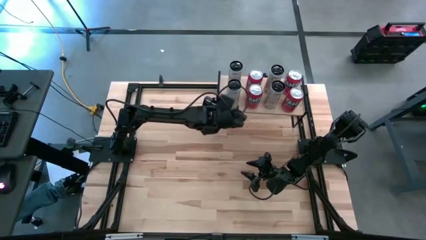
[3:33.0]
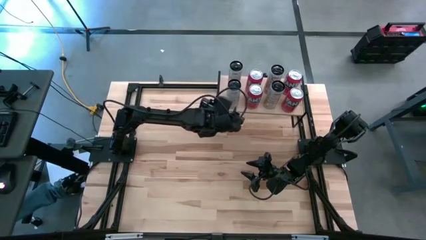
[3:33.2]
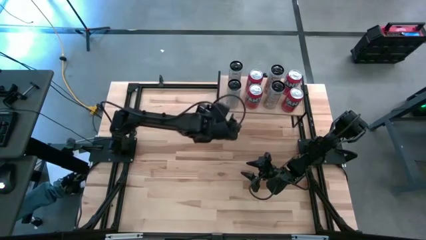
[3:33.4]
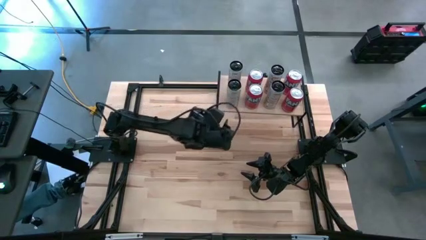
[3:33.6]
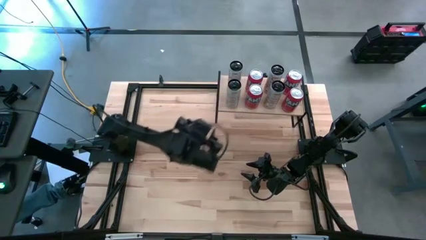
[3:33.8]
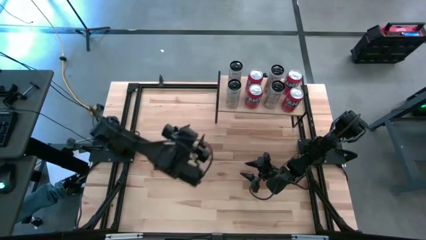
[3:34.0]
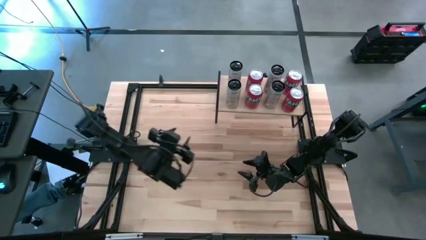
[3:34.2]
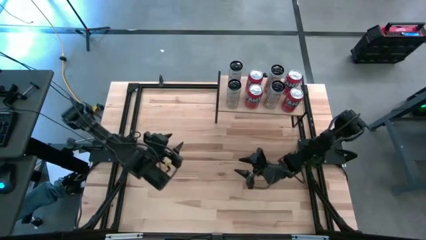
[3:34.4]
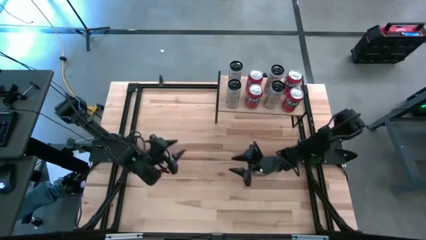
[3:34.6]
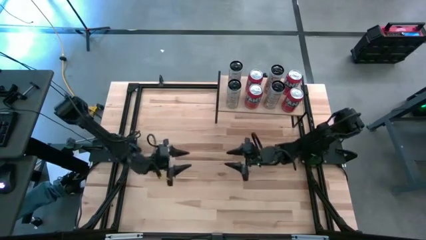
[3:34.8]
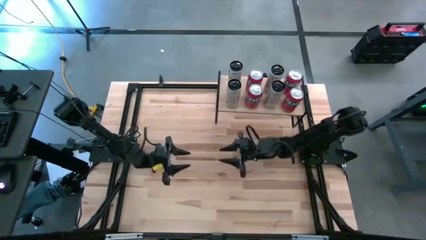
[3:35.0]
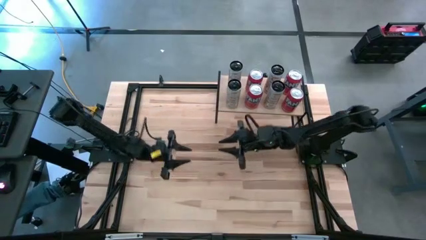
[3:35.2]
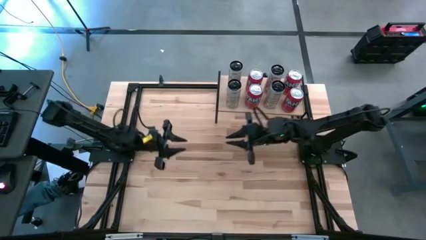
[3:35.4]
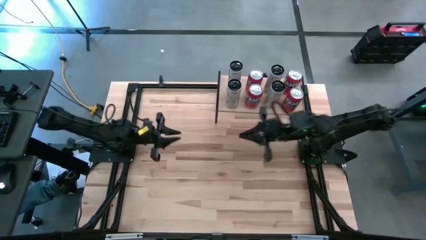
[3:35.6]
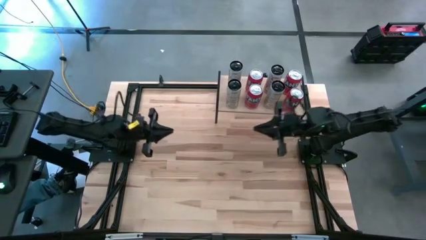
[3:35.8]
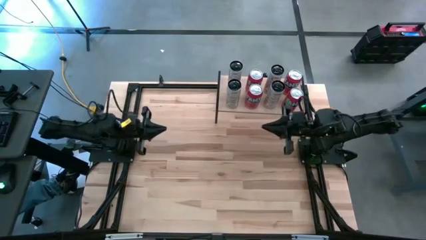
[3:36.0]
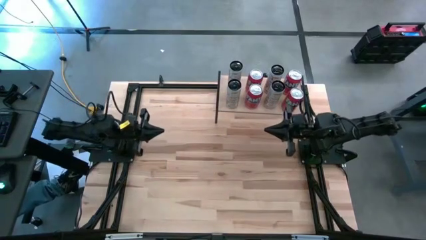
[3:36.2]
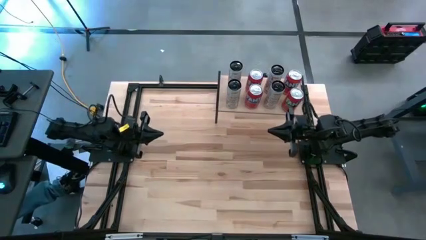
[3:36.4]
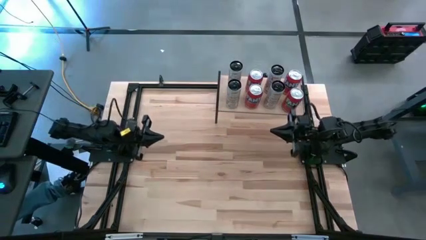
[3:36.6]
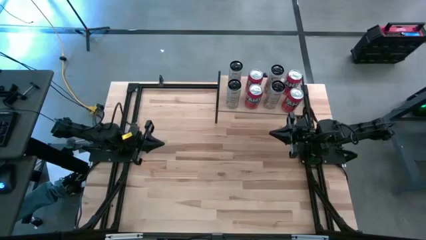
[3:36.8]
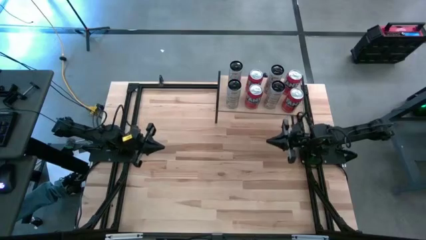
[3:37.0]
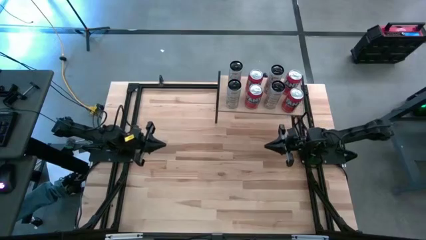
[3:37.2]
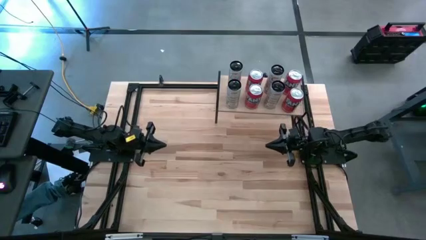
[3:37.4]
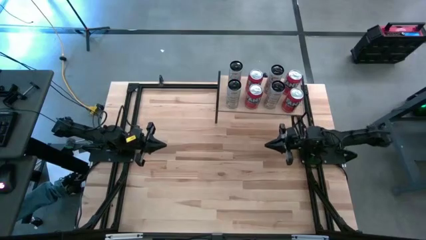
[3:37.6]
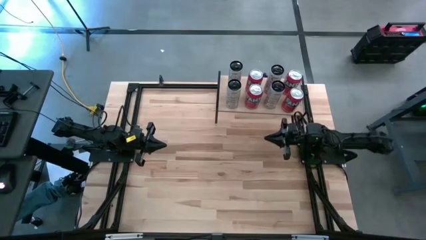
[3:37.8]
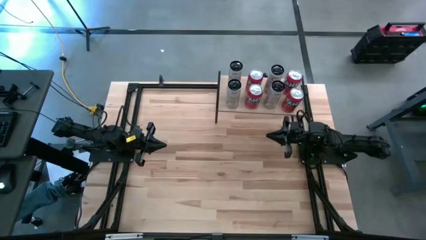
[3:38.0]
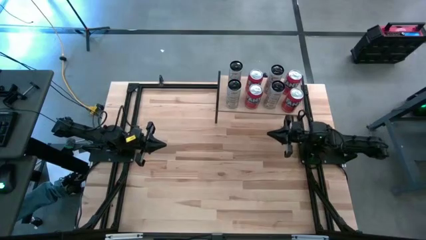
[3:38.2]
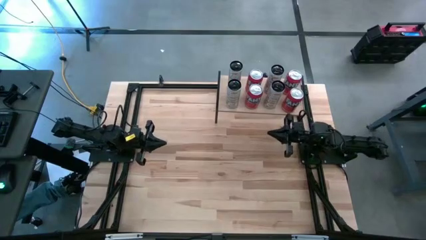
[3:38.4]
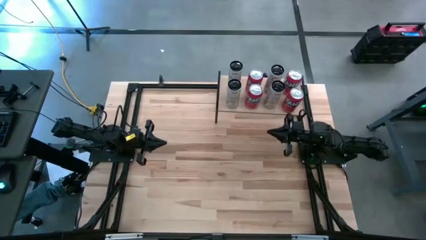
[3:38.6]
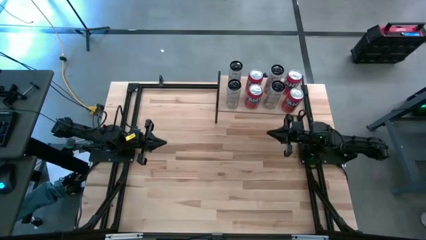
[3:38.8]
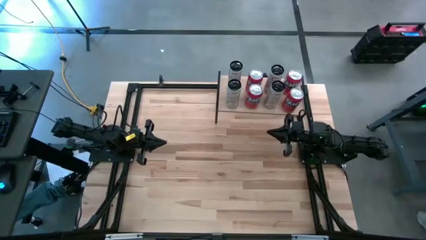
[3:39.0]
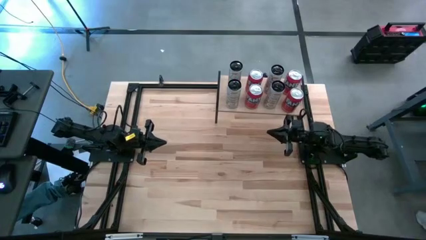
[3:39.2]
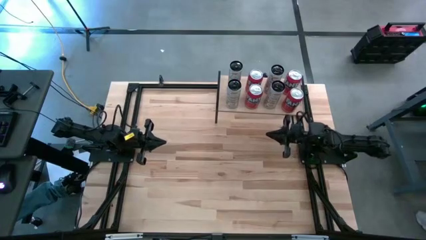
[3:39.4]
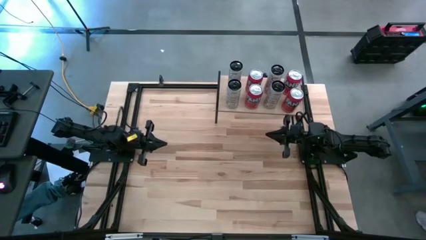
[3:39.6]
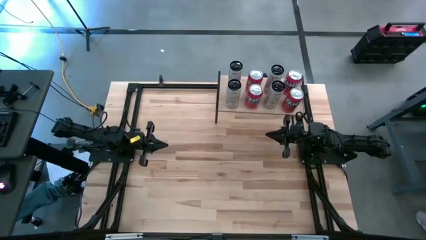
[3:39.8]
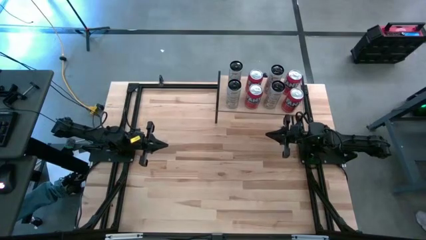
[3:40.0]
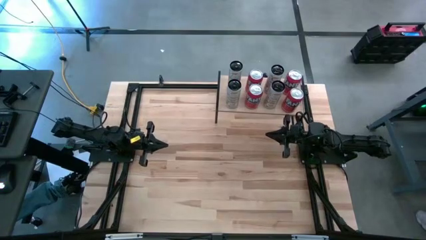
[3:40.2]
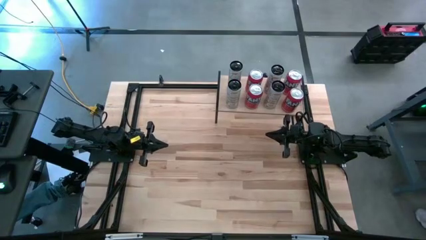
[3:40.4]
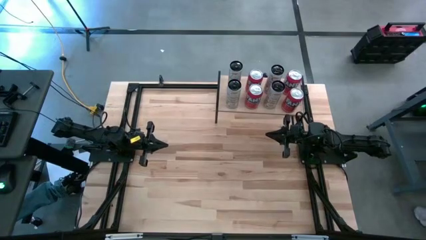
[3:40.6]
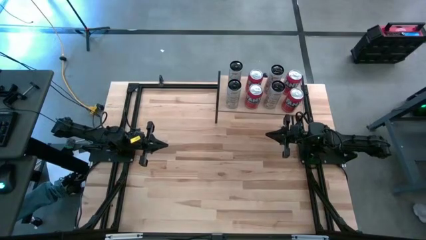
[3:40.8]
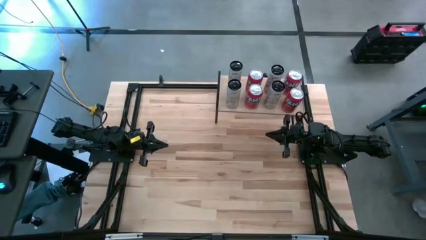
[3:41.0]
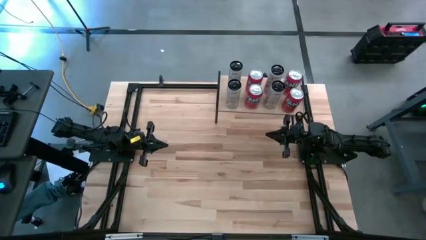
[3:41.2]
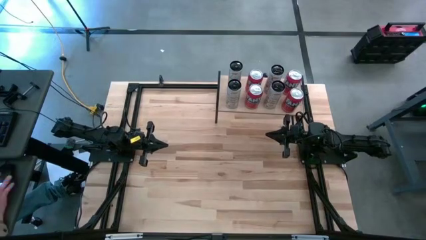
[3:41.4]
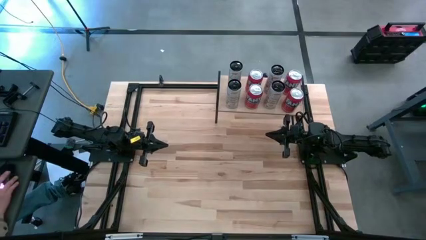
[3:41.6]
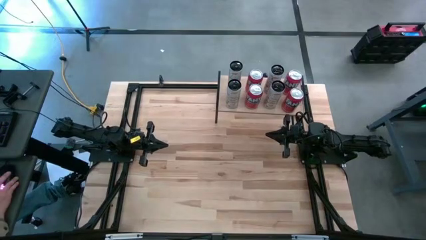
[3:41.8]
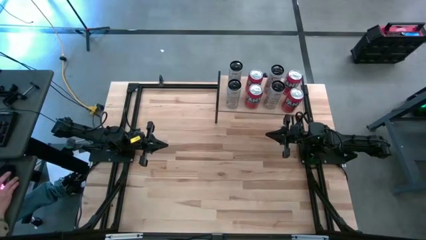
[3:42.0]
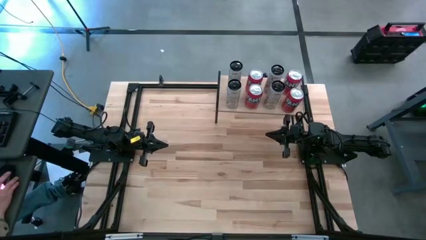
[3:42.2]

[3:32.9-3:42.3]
Task: Place canned beverage on shelf
Return to Home Position

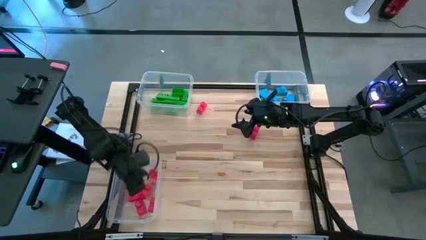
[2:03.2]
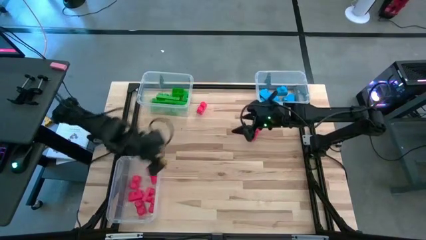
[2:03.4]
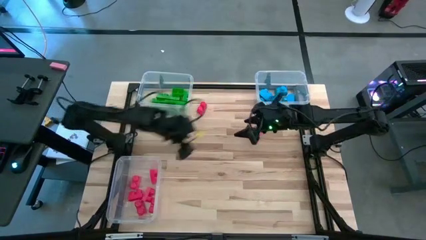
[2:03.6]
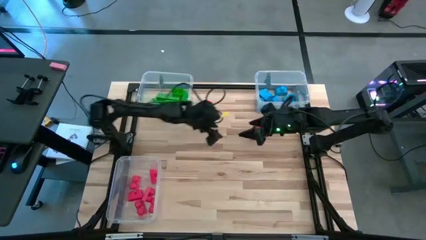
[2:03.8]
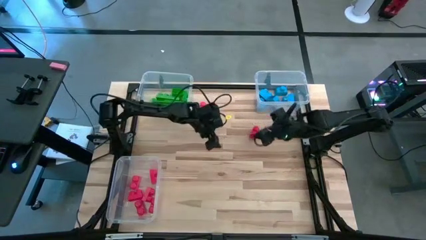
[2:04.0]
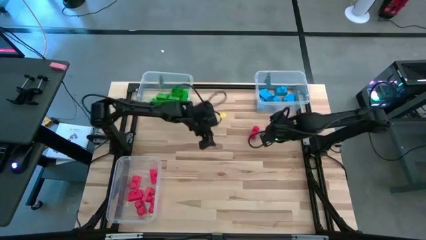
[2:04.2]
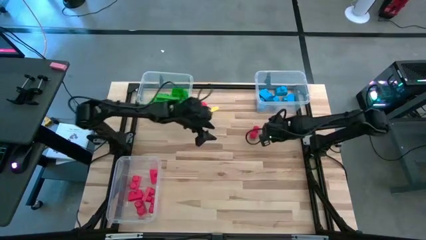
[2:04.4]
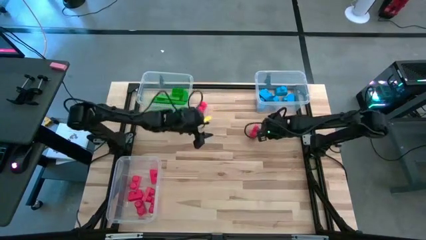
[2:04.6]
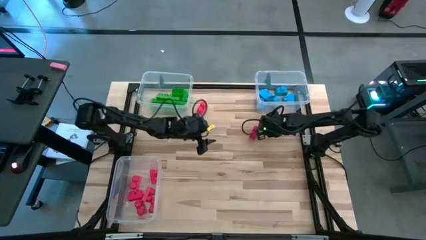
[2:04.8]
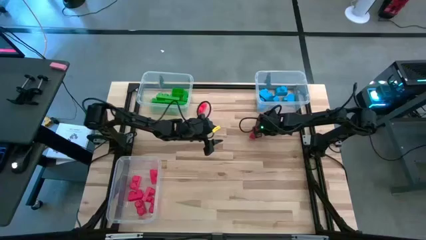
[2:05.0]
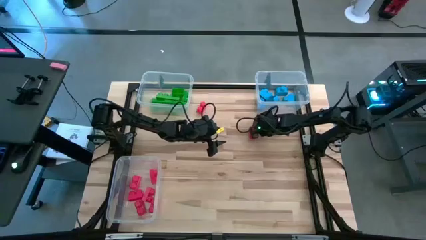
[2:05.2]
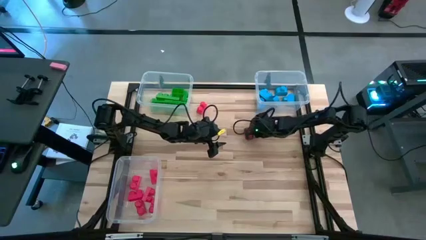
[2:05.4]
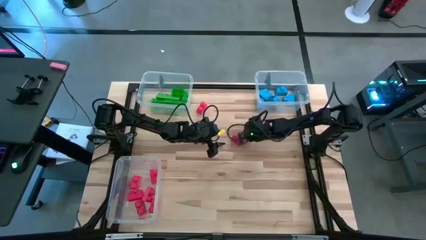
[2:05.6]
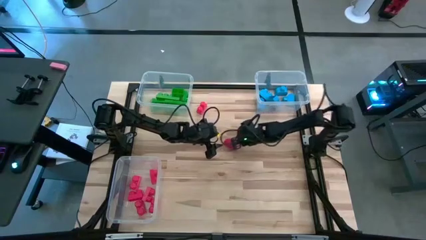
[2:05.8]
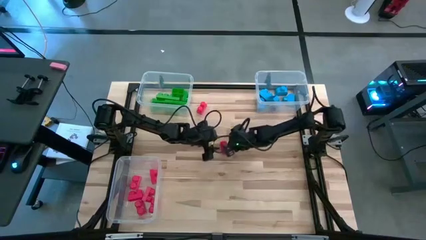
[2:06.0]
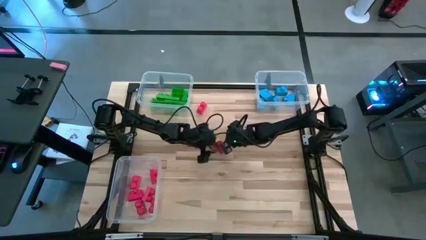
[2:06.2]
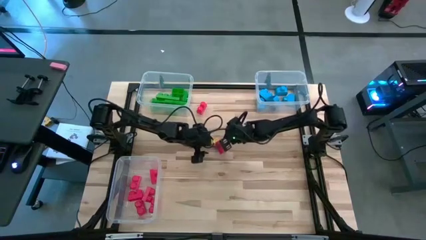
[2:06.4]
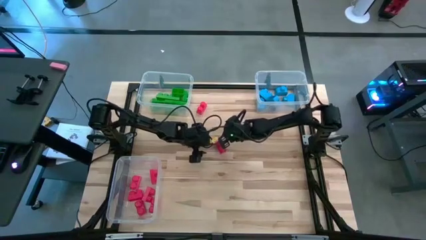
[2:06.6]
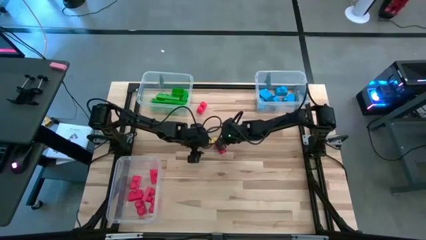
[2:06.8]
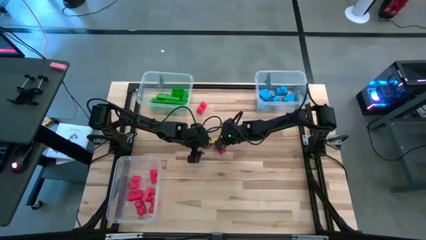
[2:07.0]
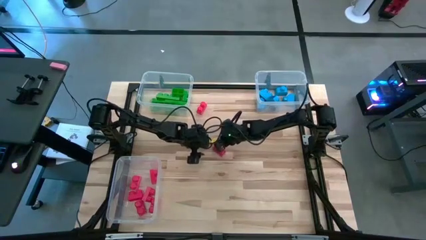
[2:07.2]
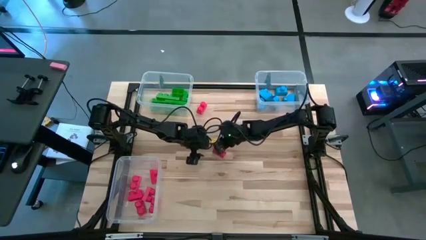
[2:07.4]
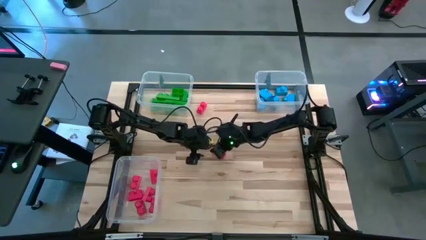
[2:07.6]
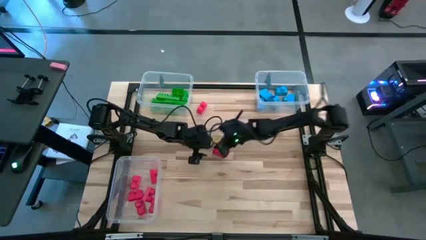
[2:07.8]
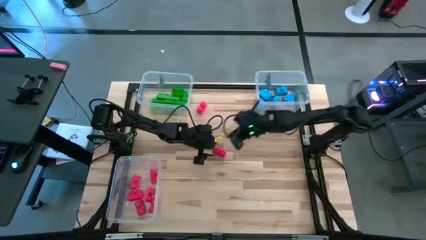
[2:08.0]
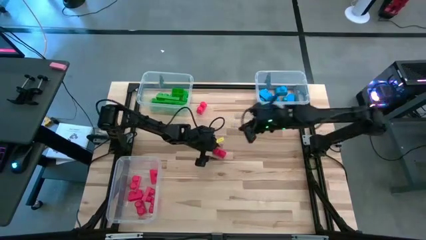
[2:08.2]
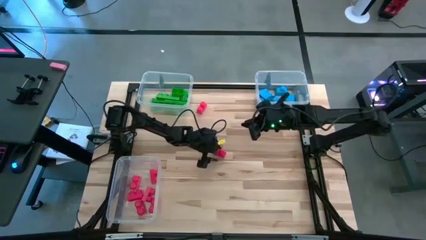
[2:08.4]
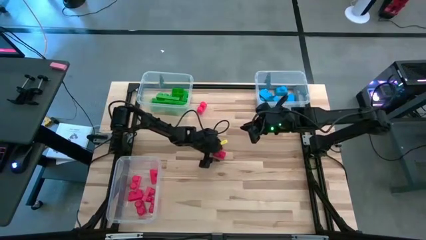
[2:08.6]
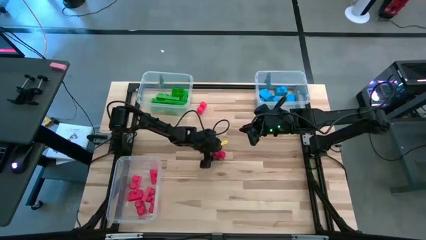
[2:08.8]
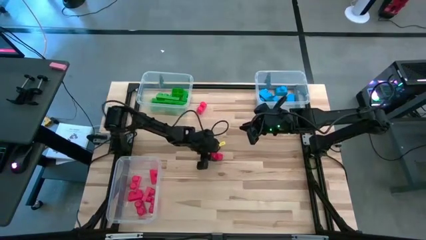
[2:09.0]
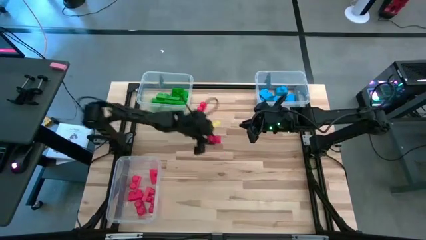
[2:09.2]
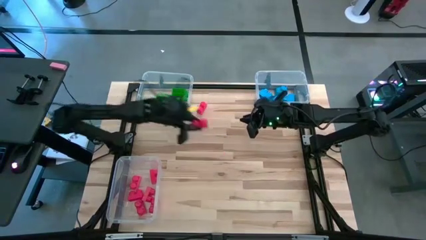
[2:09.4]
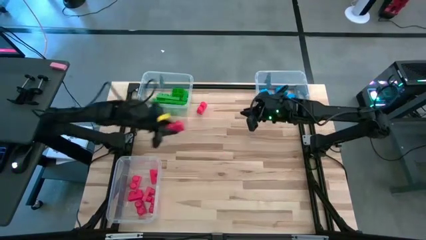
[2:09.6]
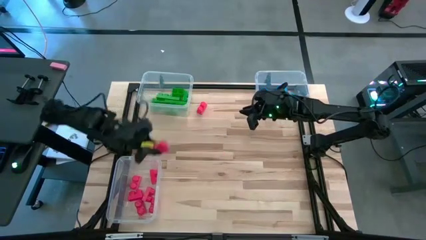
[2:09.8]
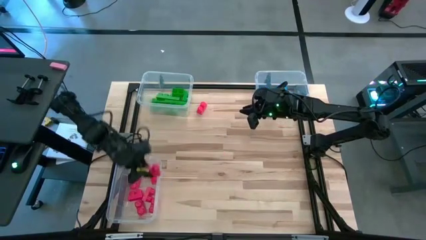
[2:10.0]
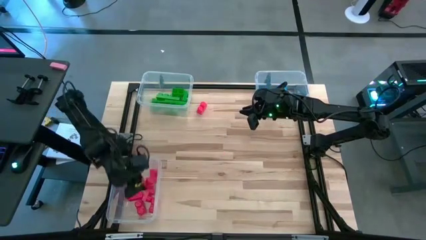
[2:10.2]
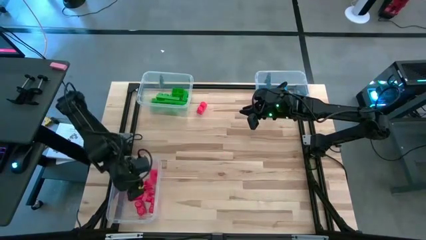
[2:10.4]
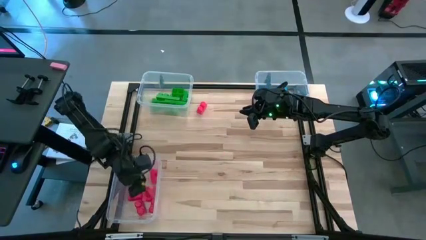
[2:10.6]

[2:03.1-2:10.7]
Task: Sort blocks
Put the red game piece into the bottom left transparent bin
